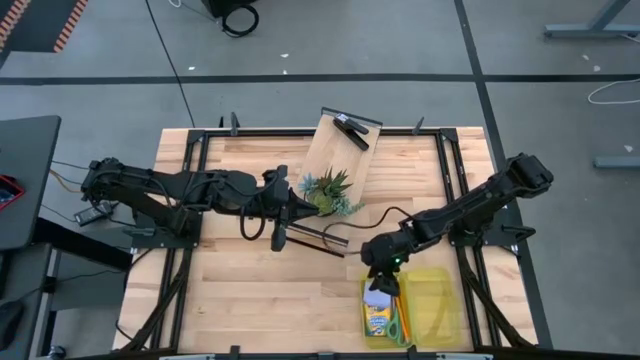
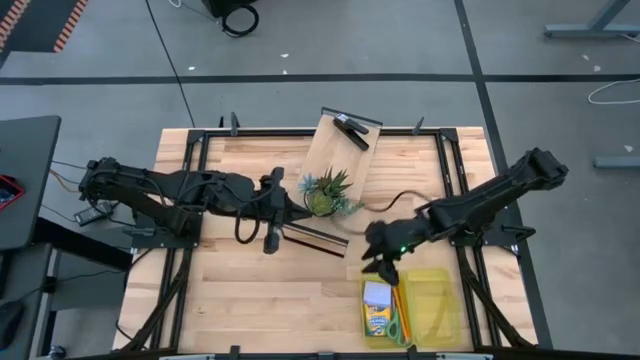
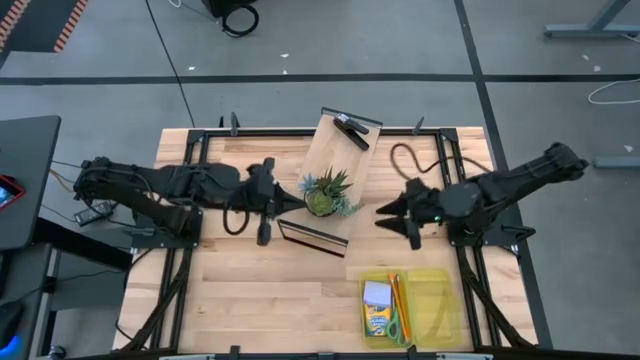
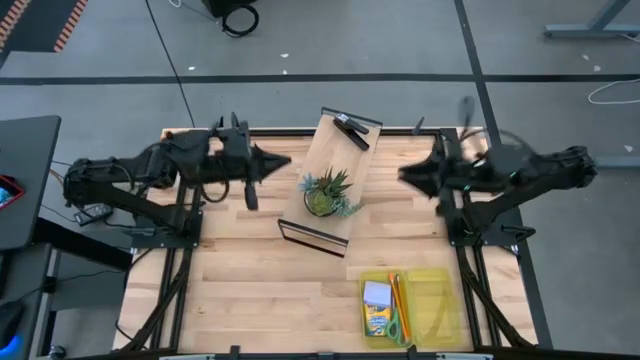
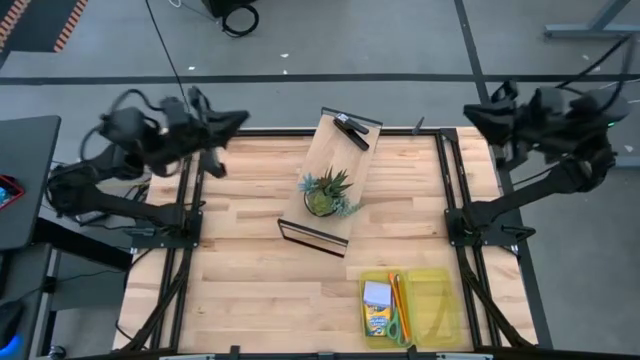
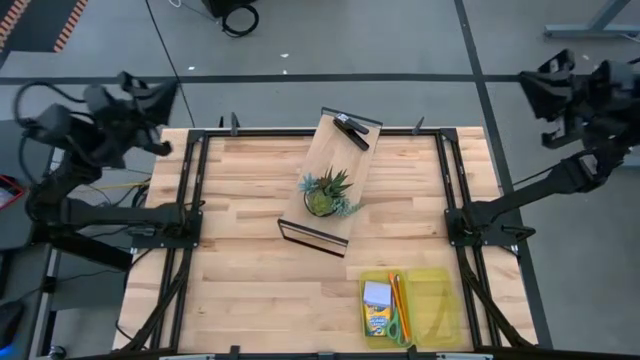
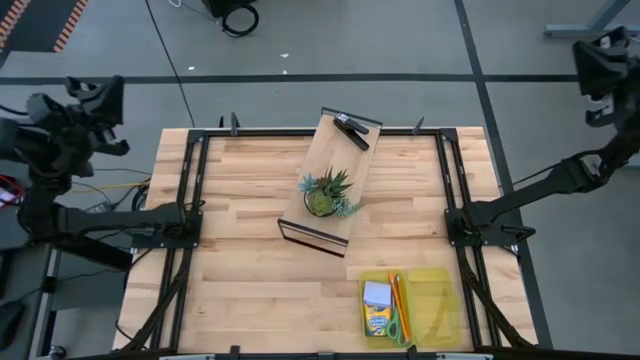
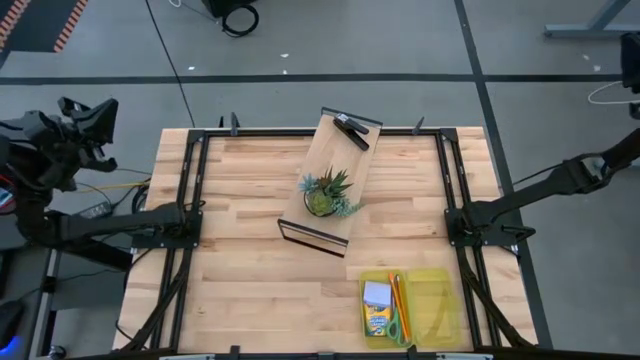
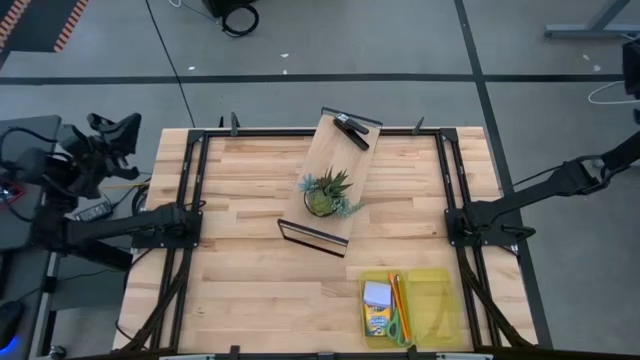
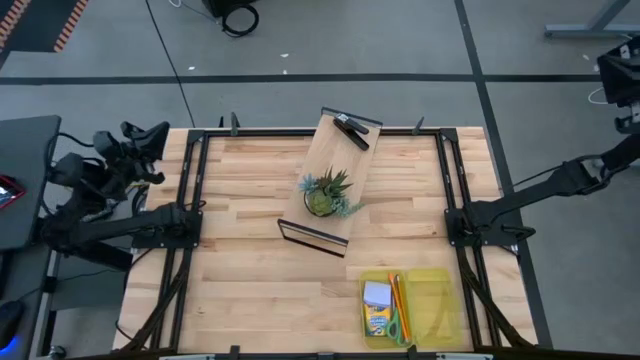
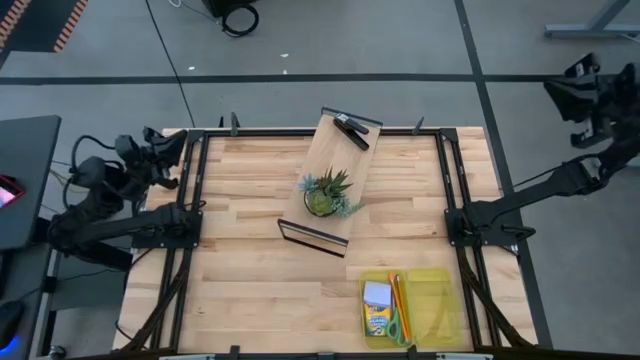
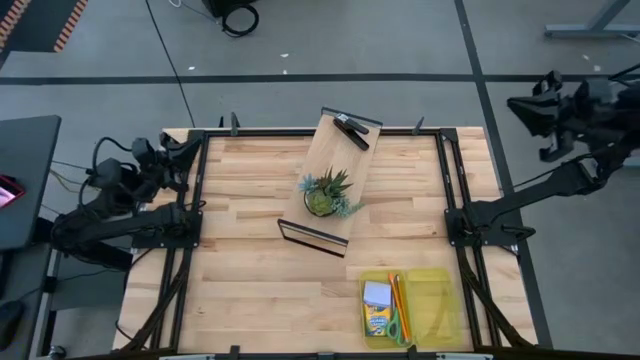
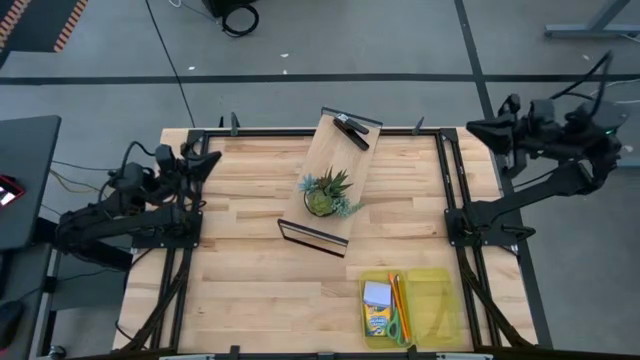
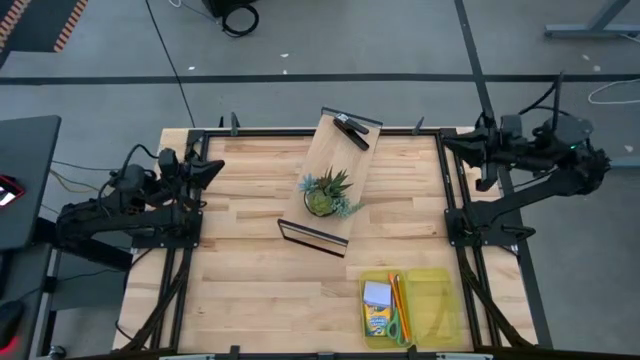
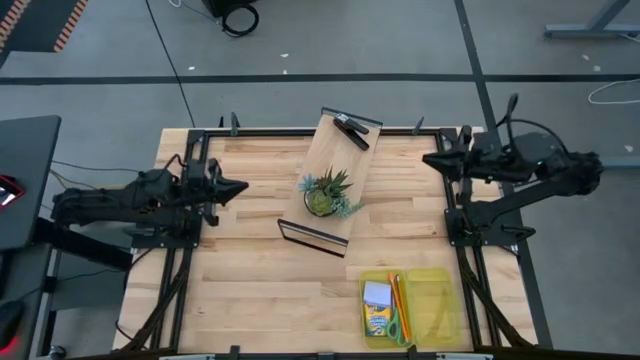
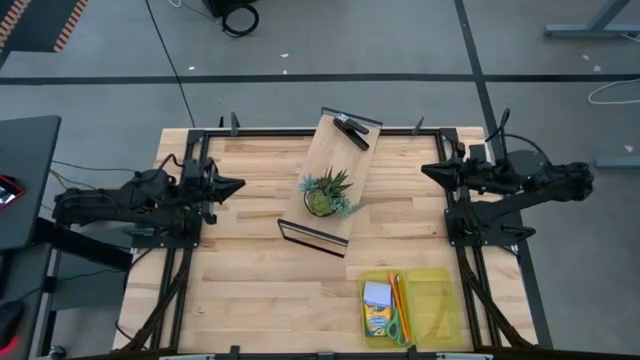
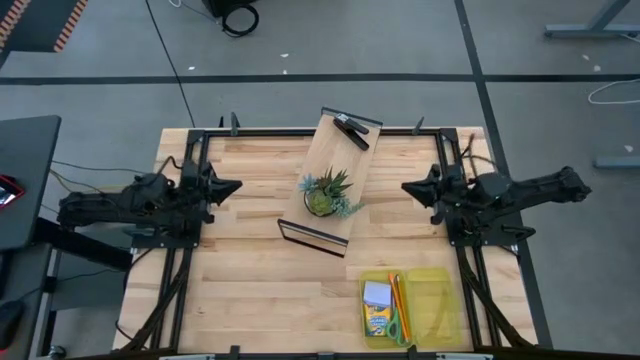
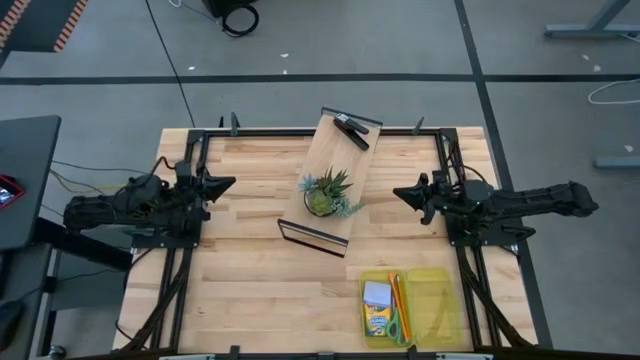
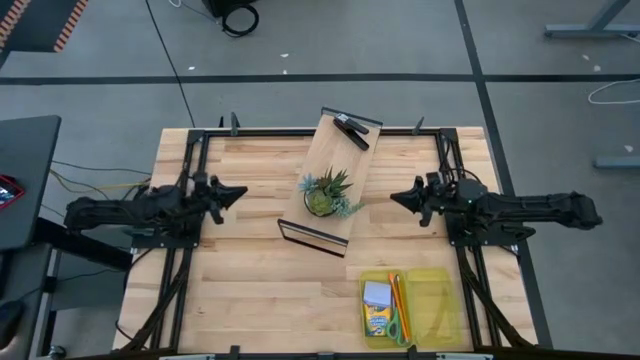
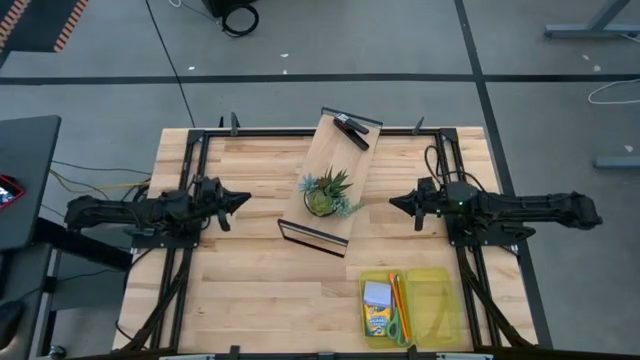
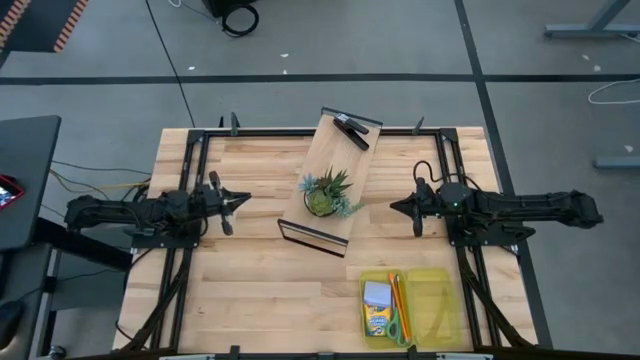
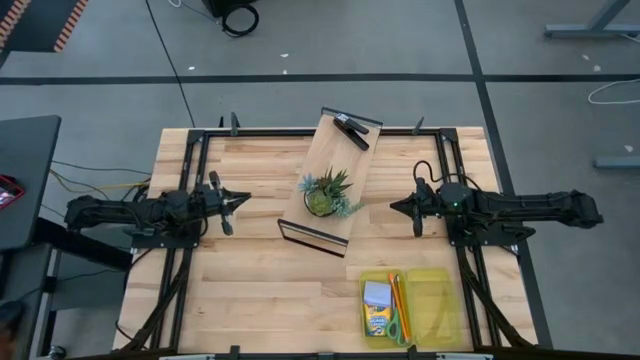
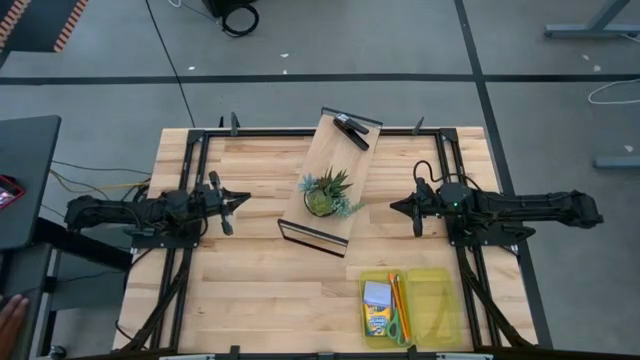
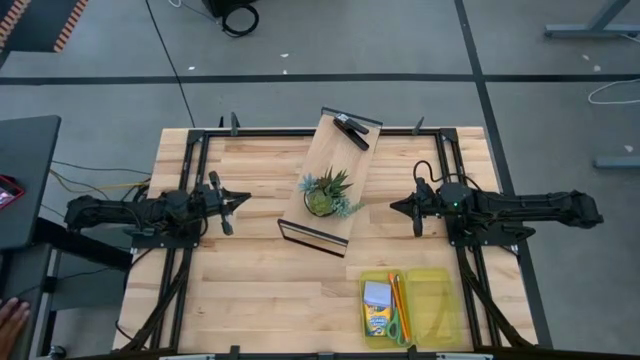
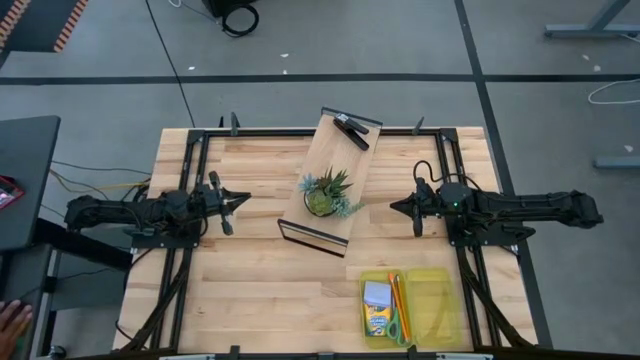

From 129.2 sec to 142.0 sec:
Task: Pack school essentials
Return to Home Position

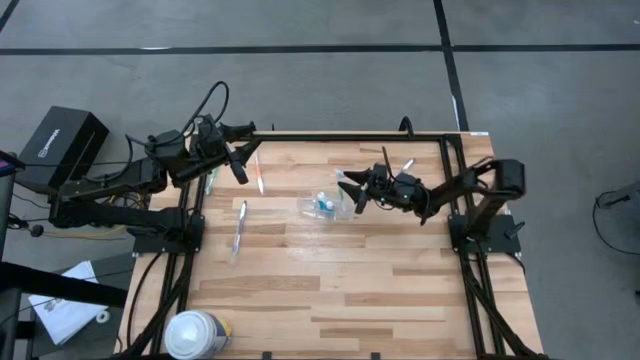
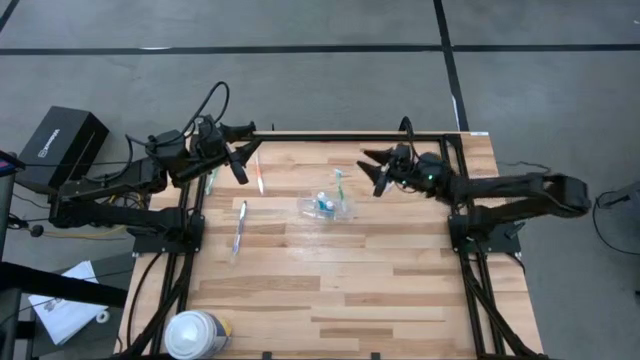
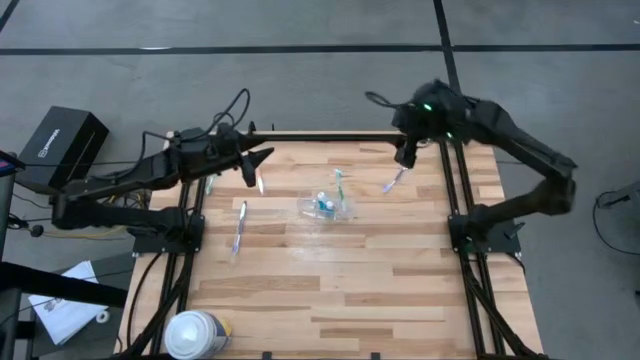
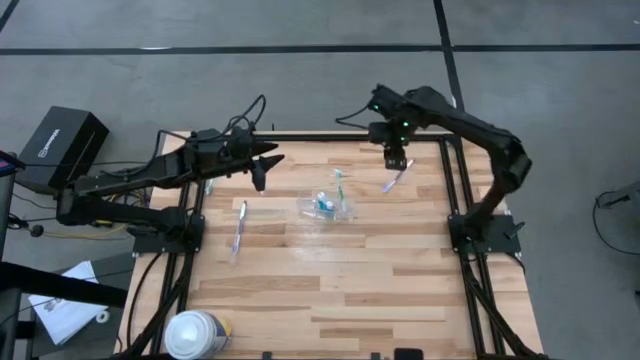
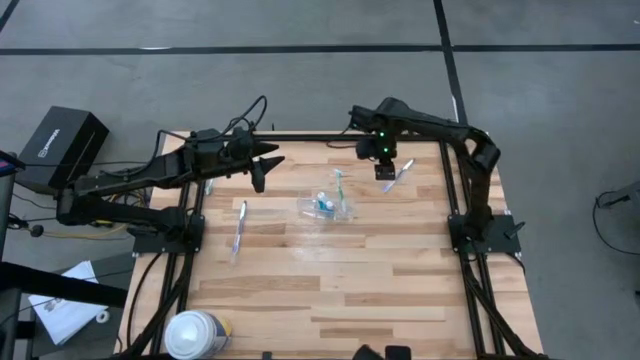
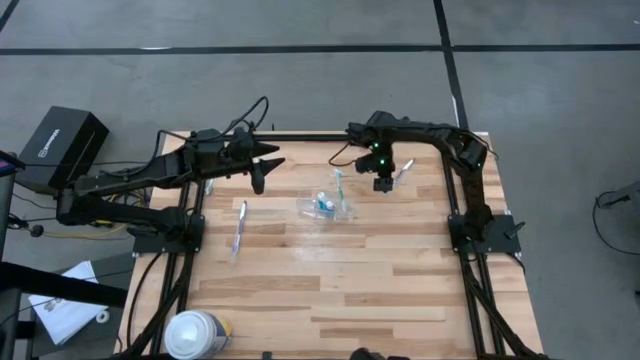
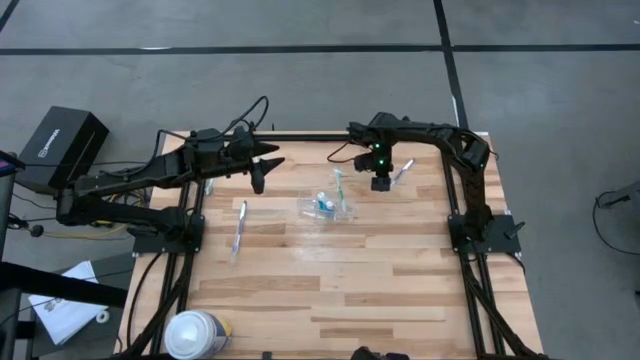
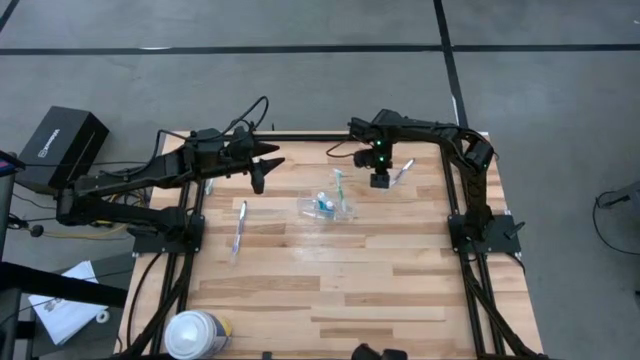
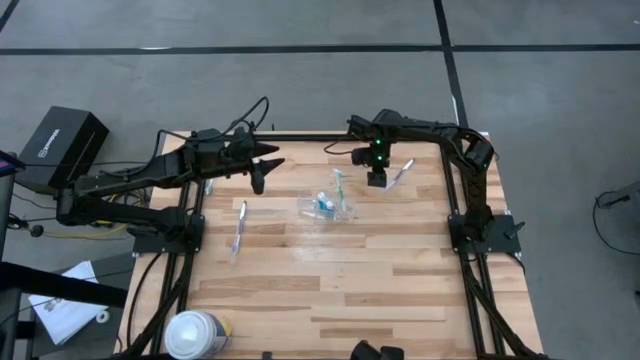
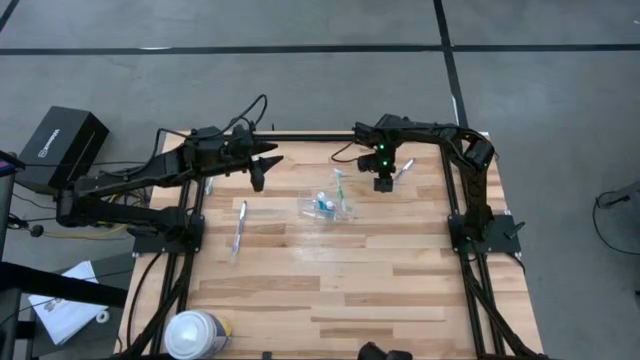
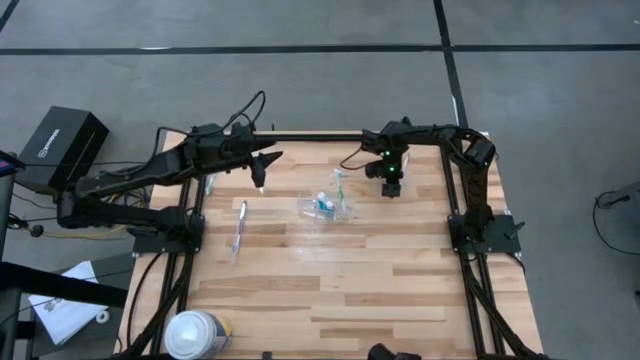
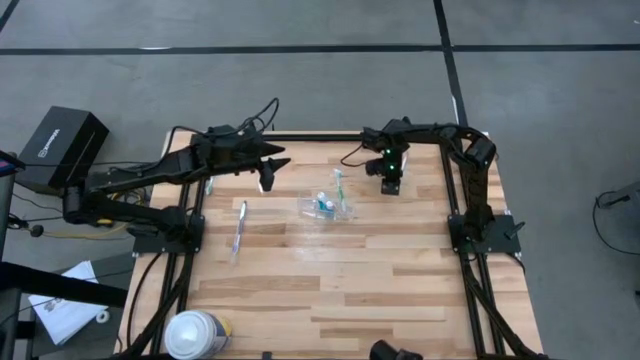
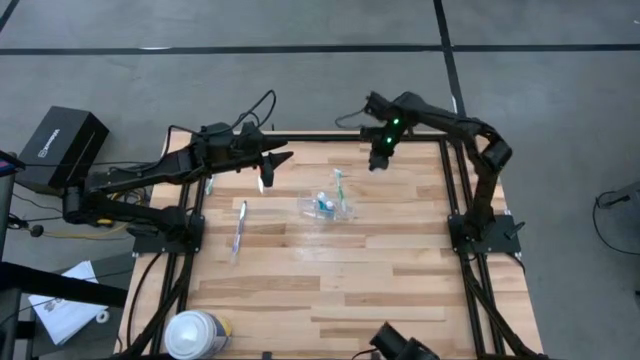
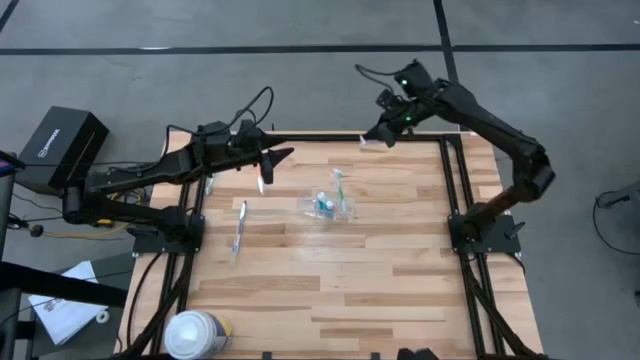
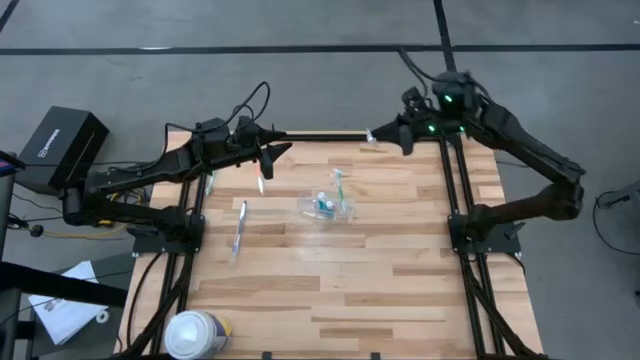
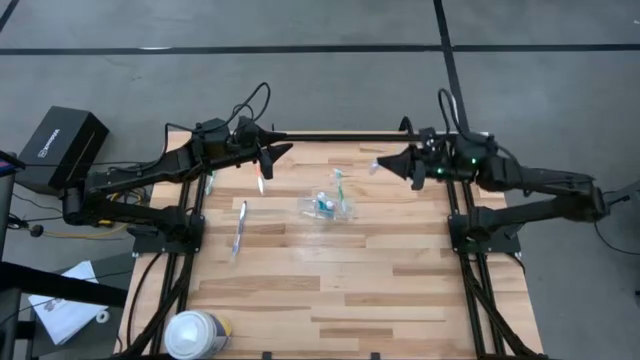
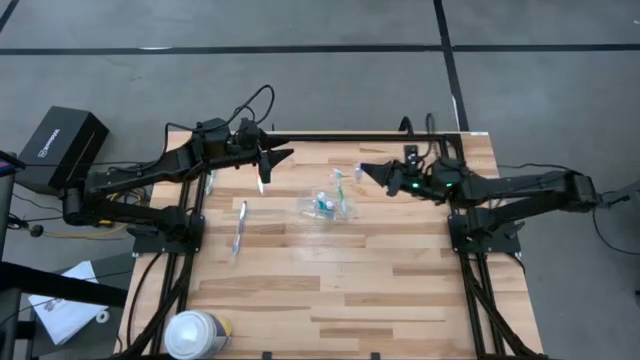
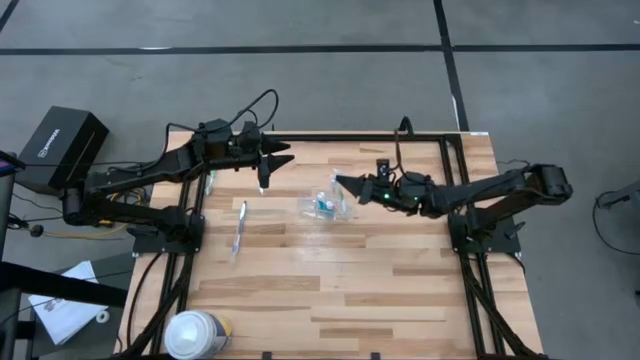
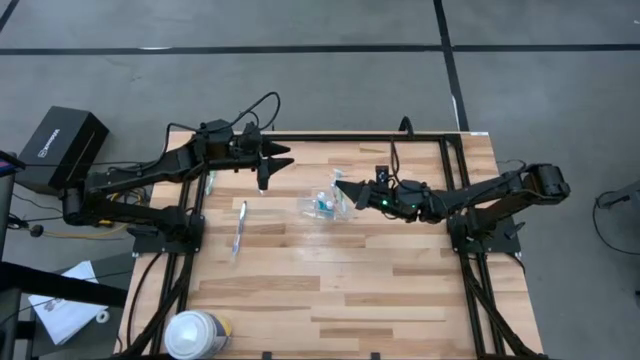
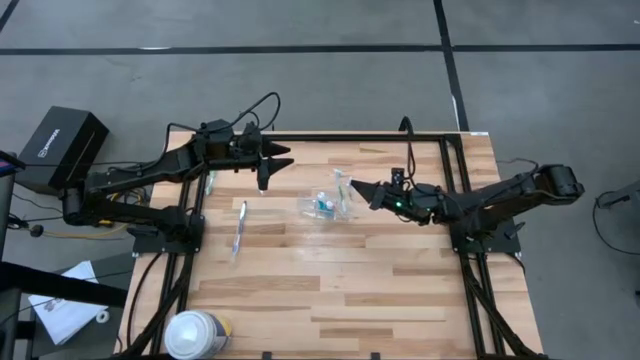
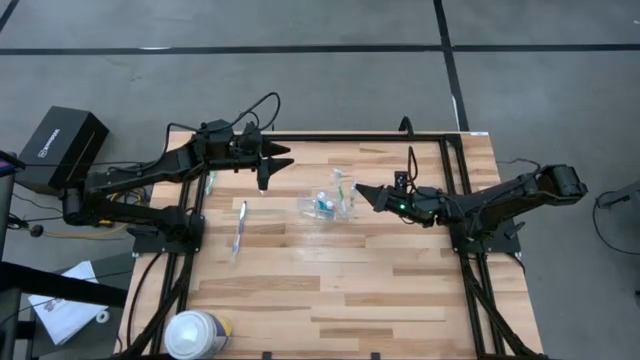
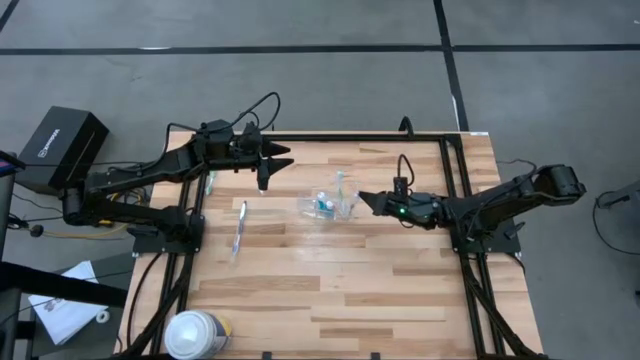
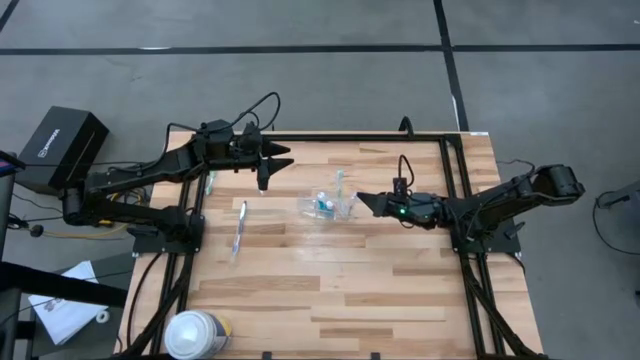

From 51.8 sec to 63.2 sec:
Task: Pick & Place toothbrushing station
Put the right purple toothbrush into the transparent organizer
